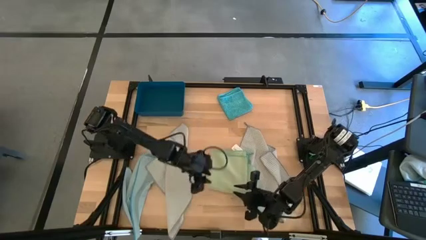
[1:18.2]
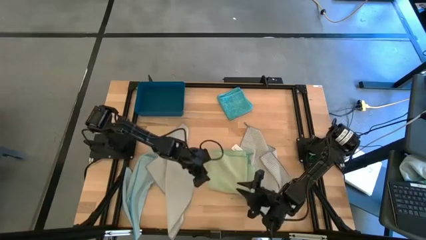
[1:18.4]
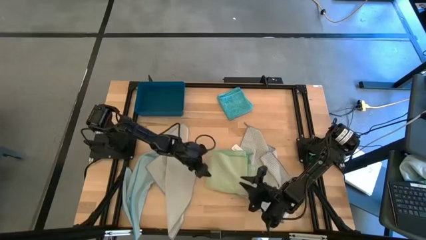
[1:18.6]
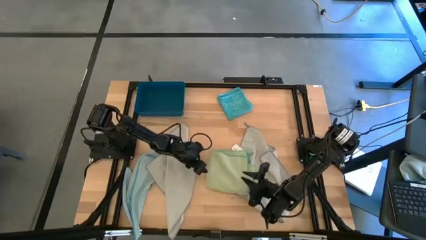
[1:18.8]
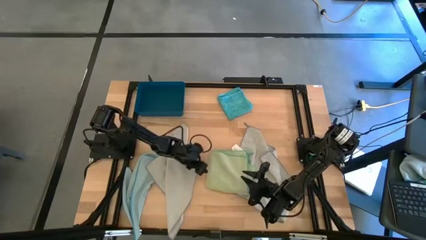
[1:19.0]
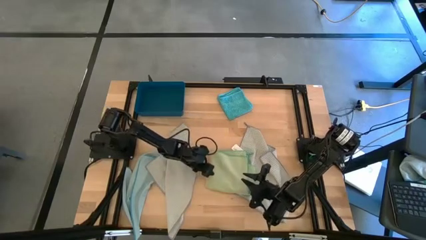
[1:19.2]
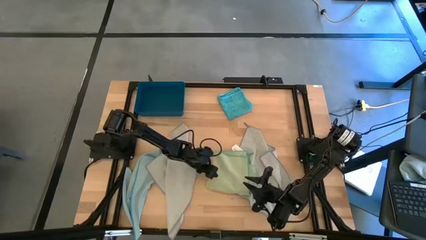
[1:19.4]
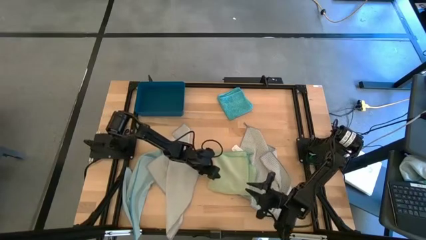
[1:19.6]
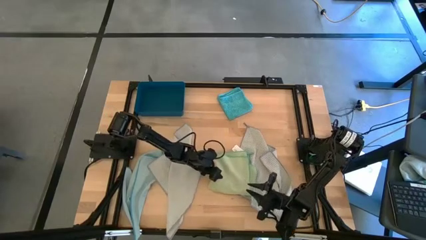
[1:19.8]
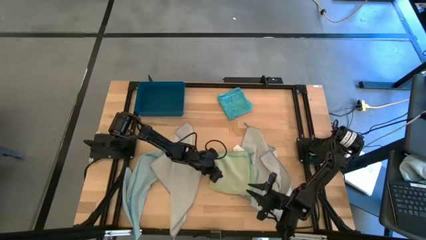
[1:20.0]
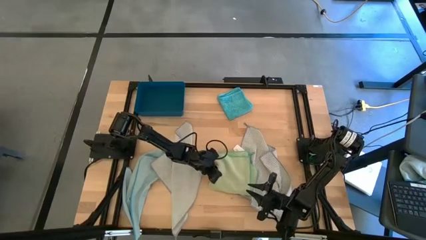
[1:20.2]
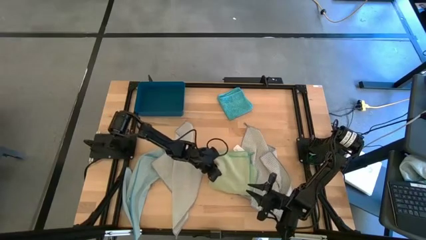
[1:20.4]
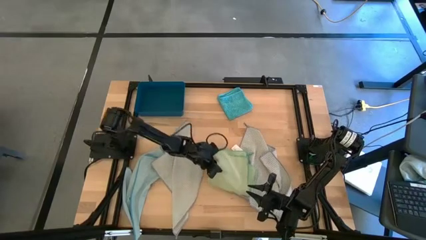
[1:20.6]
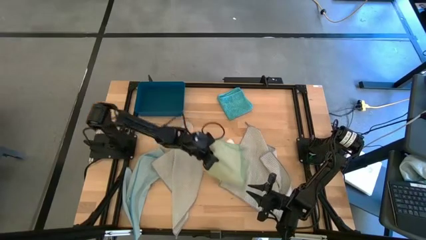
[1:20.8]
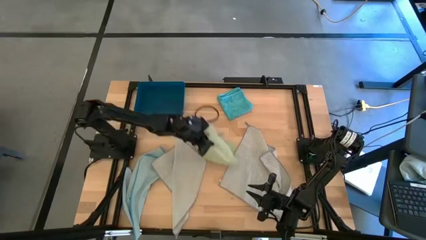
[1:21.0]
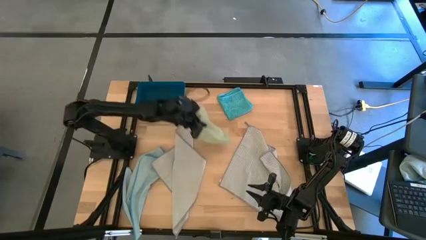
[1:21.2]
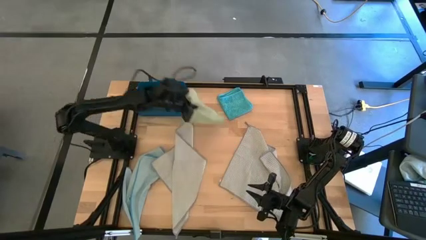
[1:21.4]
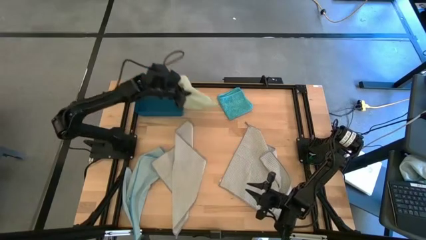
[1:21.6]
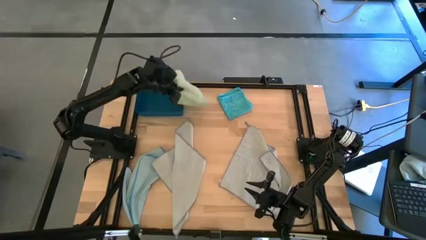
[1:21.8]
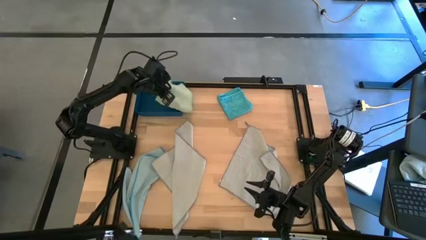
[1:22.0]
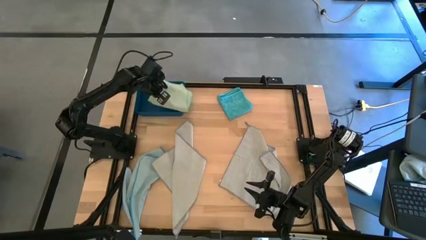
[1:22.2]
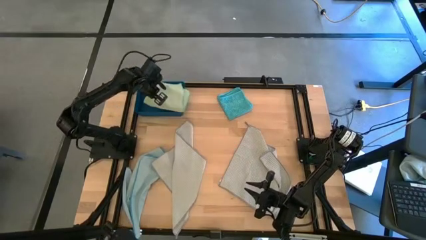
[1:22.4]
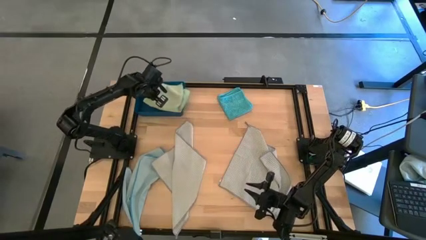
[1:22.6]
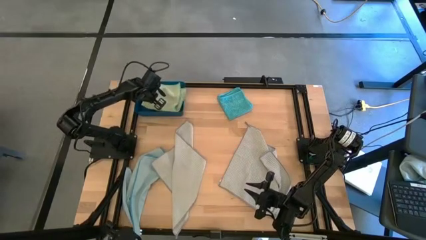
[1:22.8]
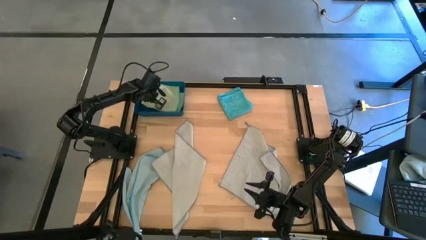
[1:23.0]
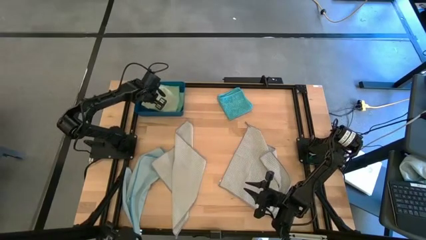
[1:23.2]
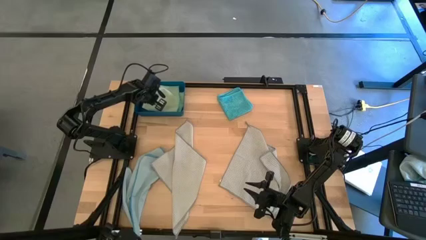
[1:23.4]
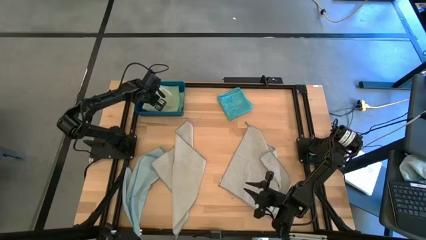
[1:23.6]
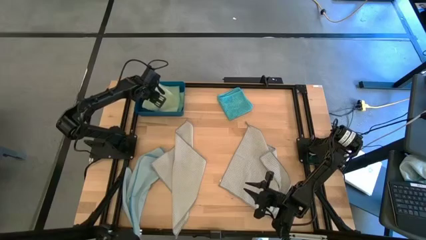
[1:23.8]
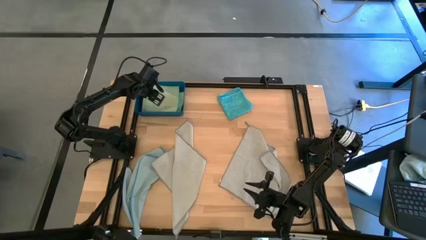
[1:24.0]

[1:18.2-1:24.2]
Task: Fold microfiber towels
Put the green towel into the blue bin

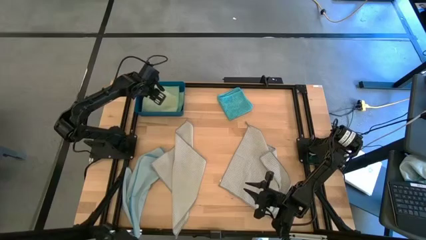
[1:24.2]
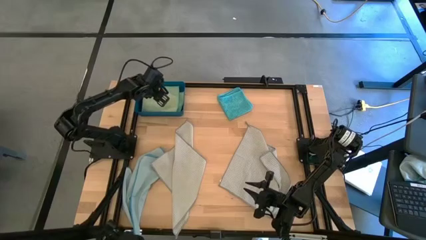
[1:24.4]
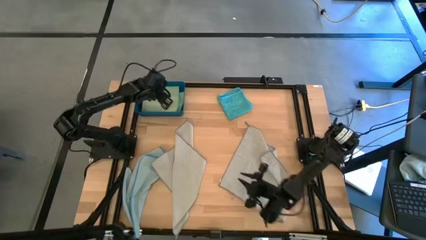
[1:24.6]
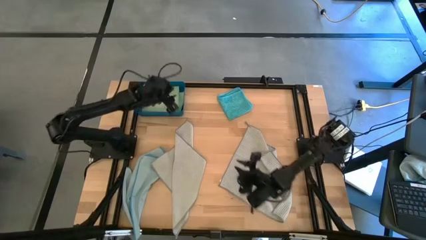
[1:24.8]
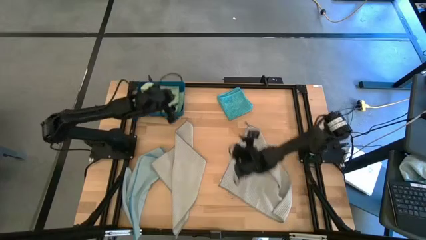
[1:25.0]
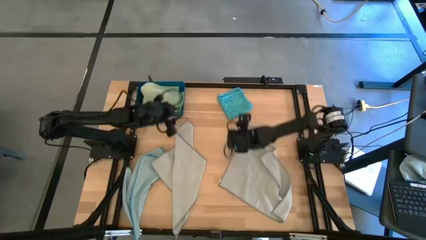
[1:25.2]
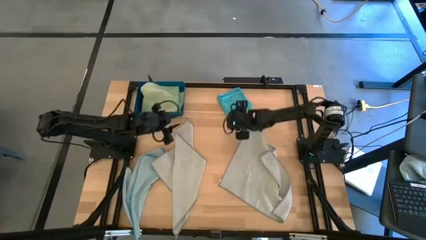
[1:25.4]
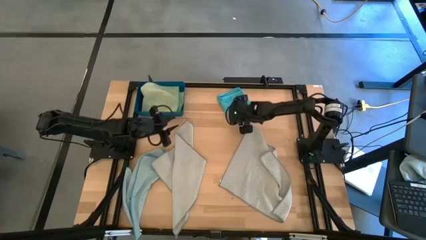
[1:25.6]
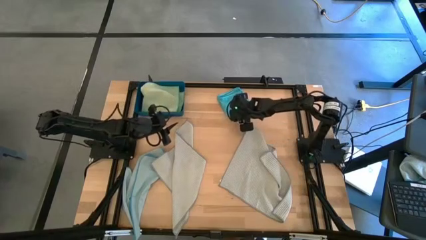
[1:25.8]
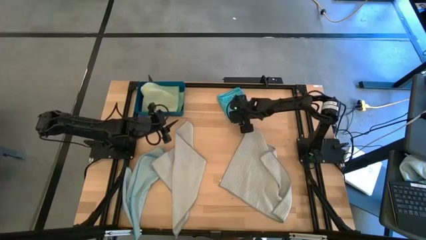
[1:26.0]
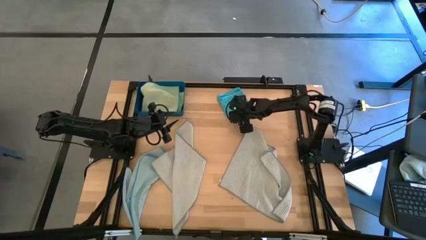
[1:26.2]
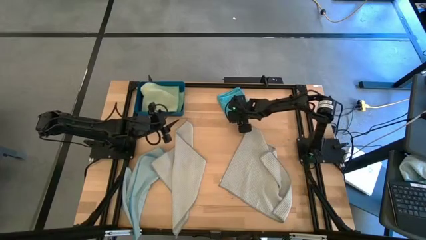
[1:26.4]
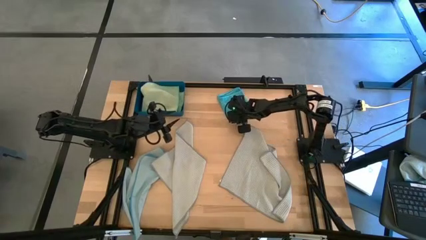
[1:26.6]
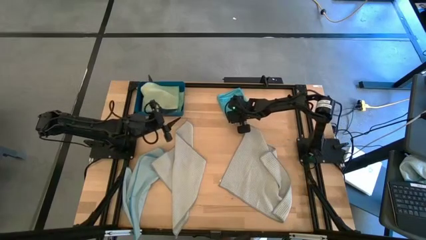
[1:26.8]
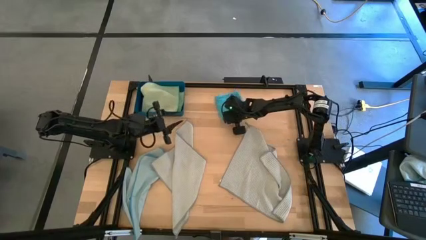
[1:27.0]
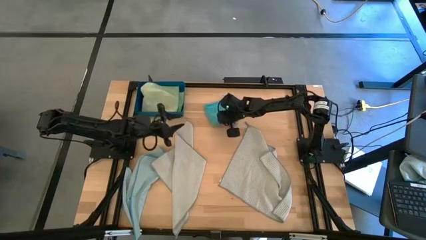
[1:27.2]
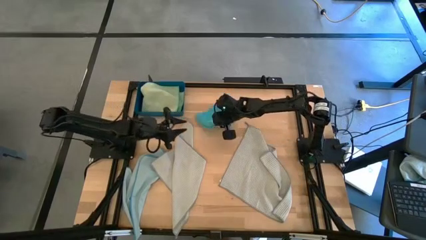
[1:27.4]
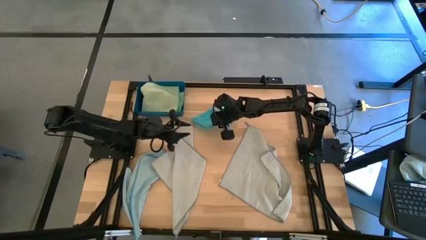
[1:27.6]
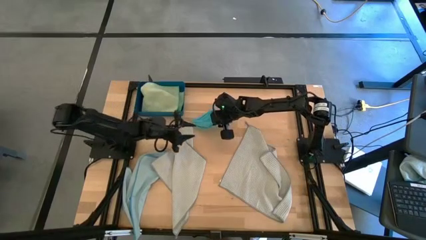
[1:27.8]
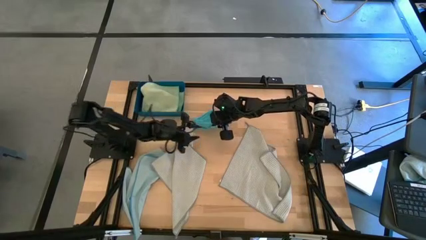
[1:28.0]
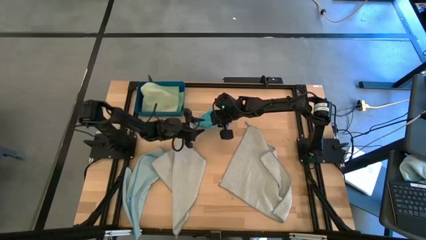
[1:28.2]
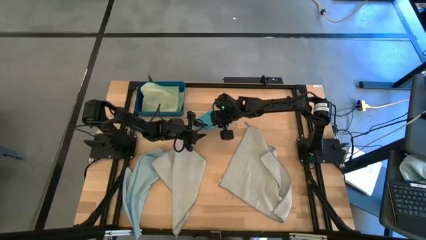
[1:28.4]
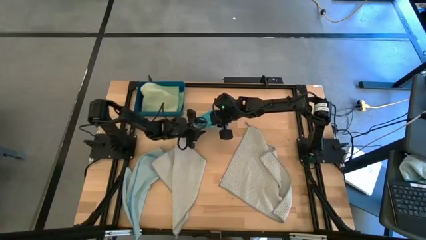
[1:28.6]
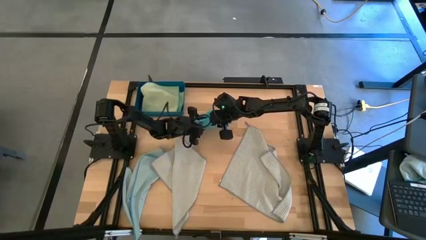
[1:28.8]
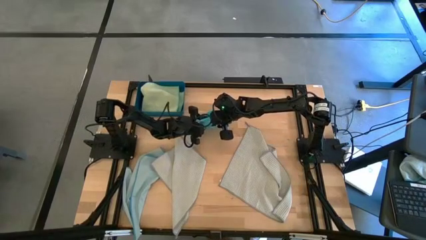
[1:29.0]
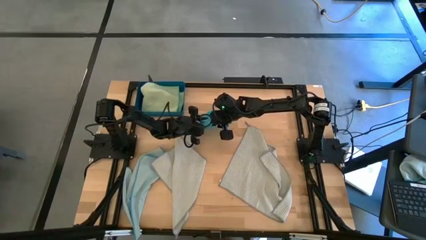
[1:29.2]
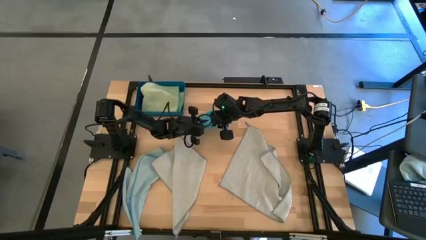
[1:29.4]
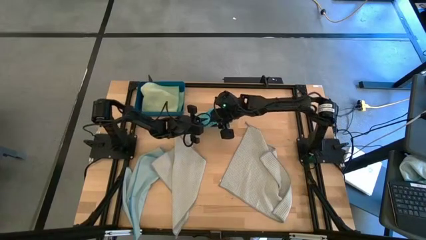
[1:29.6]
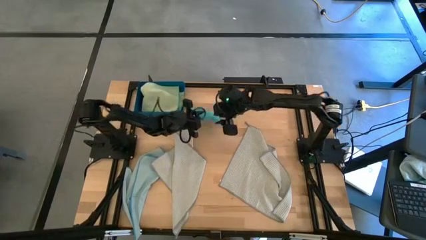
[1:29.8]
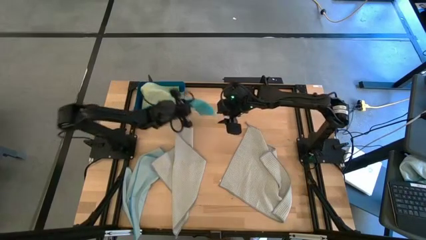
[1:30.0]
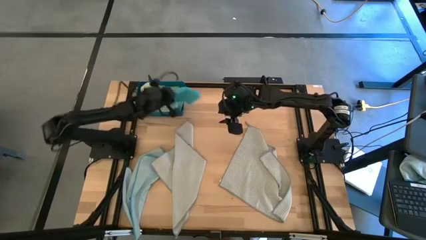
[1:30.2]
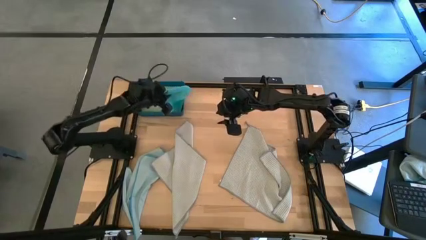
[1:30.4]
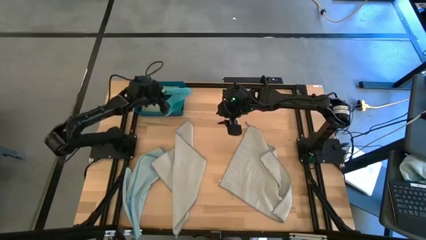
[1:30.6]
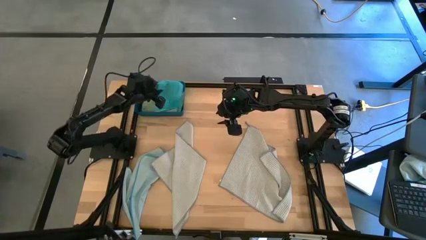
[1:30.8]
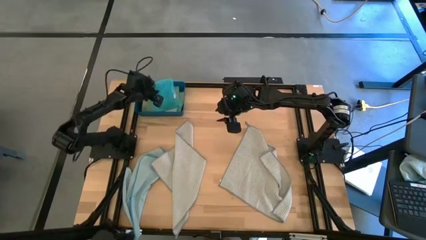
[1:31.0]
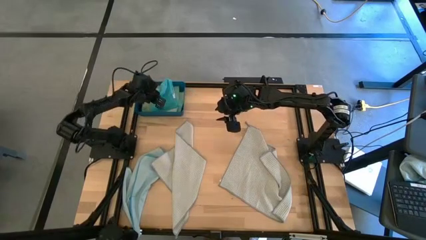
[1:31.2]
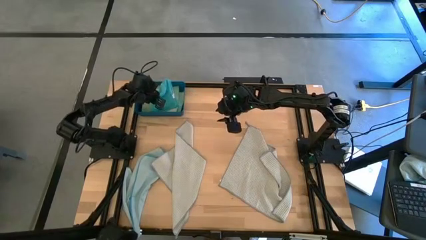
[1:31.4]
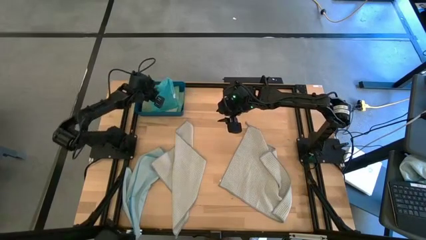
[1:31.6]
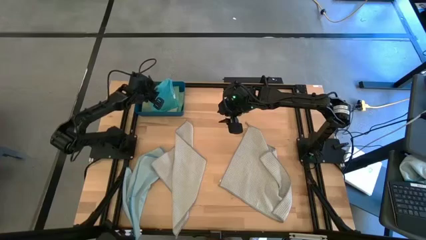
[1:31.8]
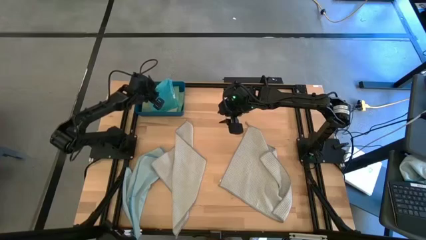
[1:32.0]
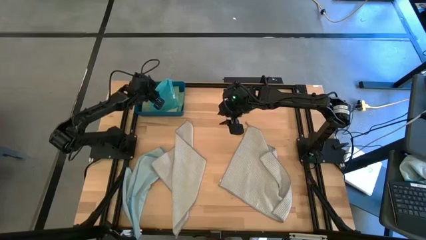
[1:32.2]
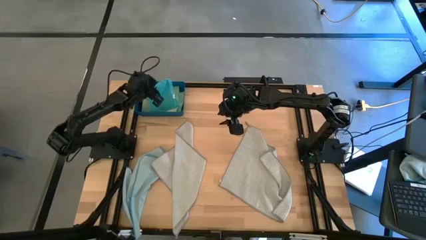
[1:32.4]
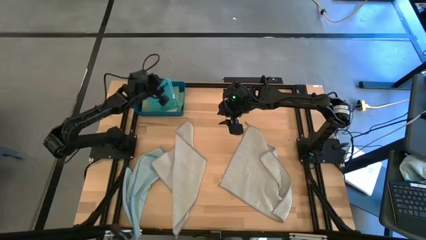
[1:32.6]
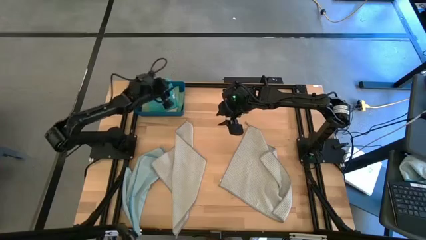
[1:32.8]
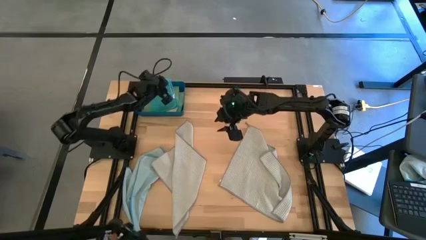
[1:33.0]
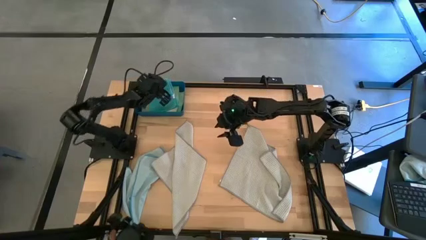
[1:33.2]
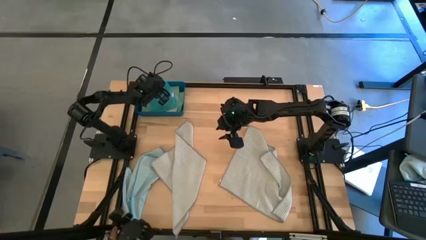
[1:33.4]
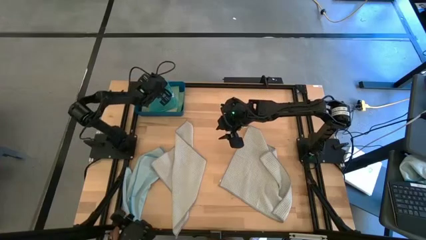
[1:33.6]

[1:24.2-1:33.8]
Put the blue towel into the blue bin
